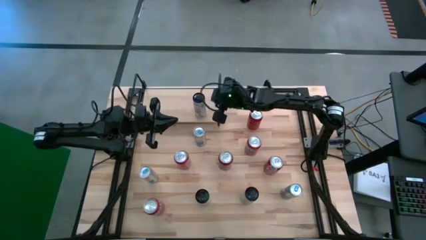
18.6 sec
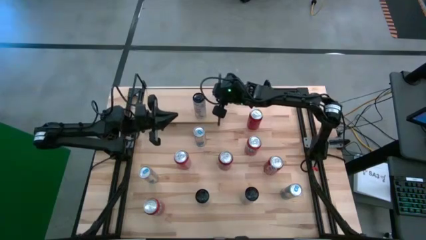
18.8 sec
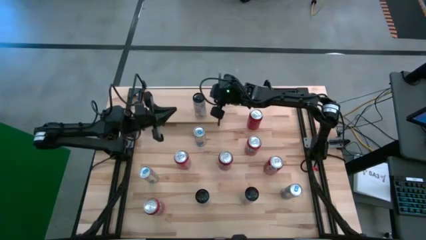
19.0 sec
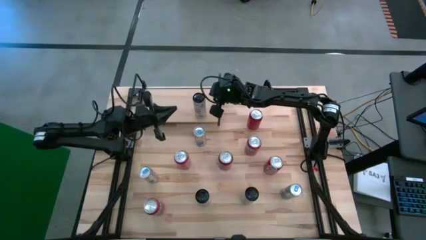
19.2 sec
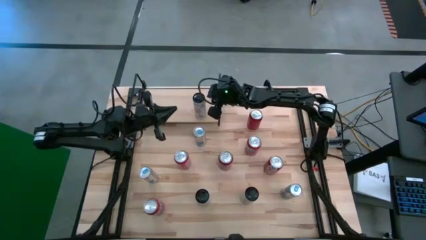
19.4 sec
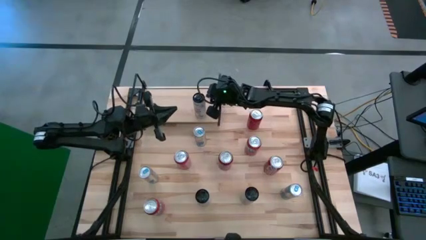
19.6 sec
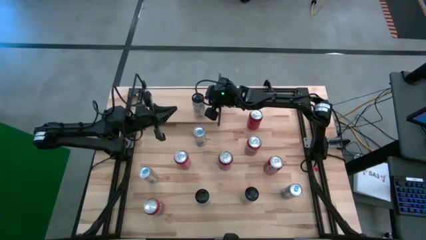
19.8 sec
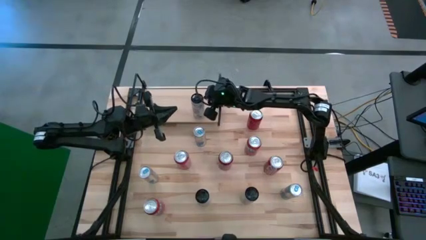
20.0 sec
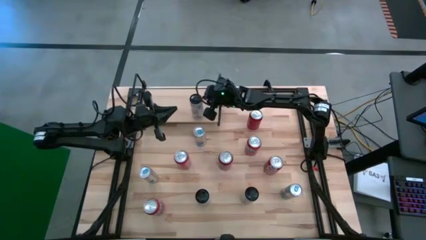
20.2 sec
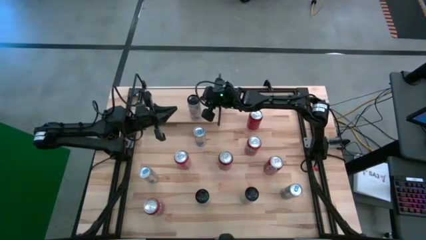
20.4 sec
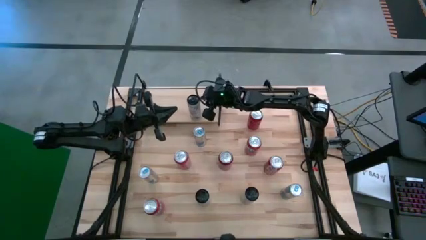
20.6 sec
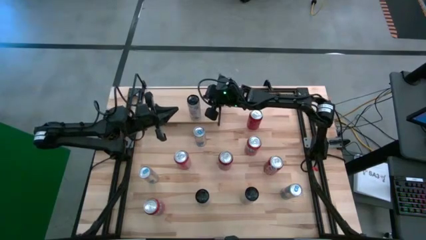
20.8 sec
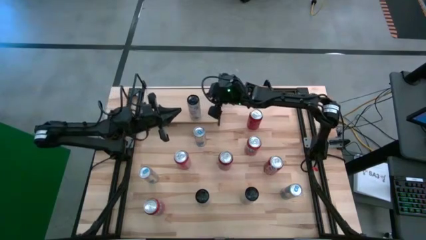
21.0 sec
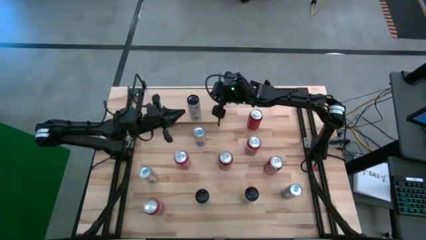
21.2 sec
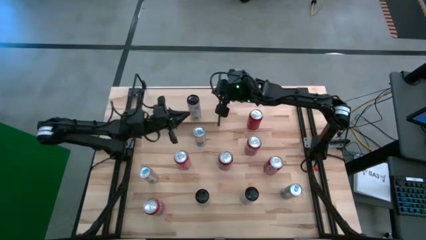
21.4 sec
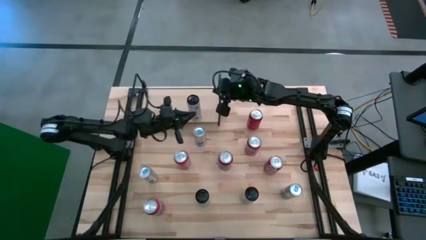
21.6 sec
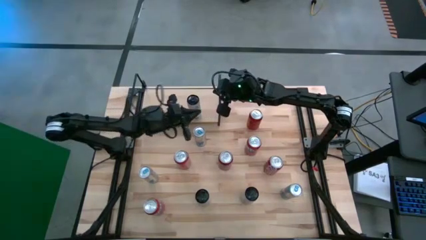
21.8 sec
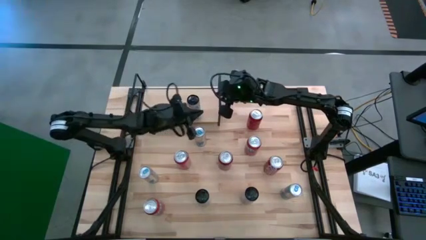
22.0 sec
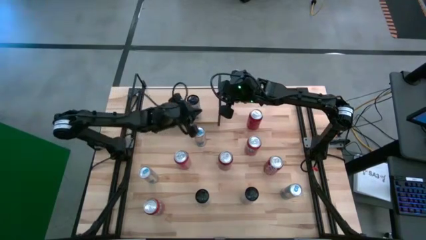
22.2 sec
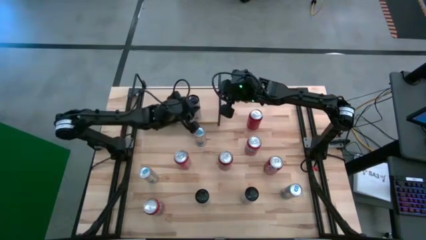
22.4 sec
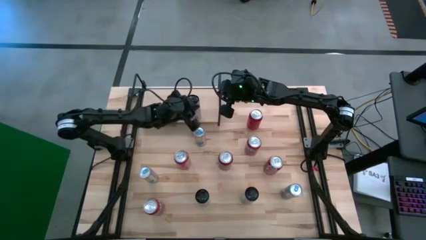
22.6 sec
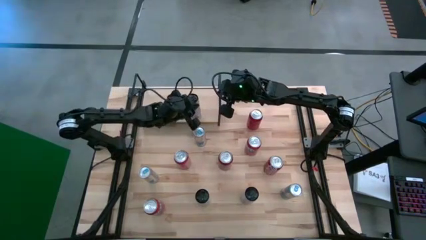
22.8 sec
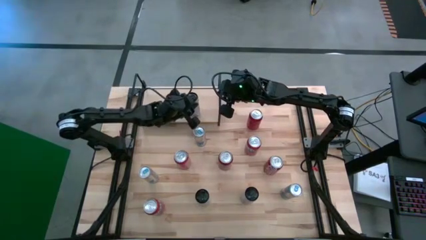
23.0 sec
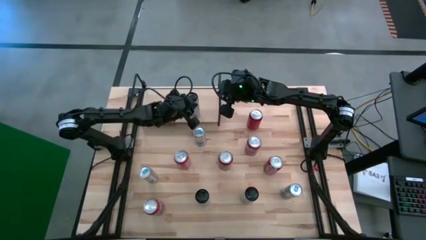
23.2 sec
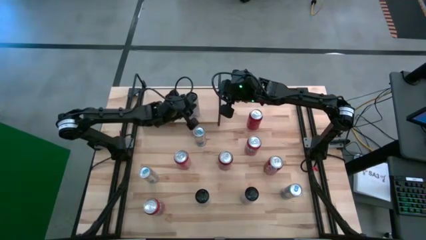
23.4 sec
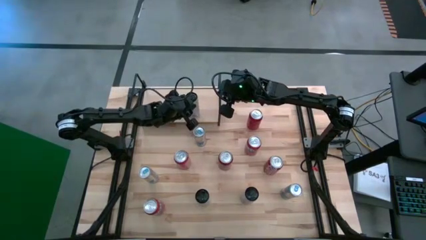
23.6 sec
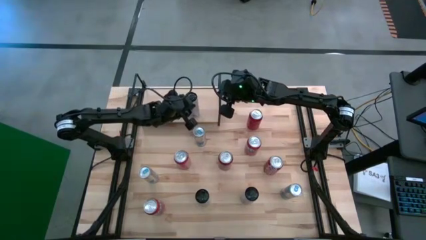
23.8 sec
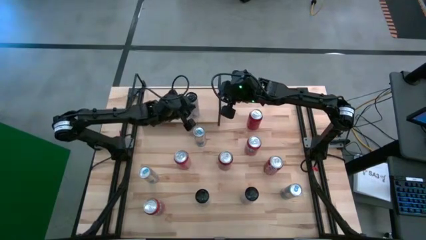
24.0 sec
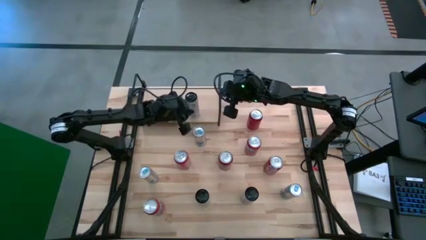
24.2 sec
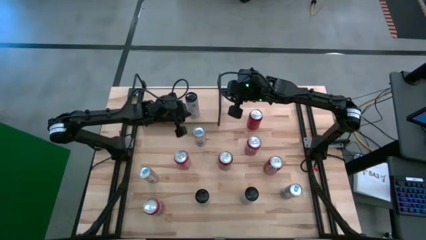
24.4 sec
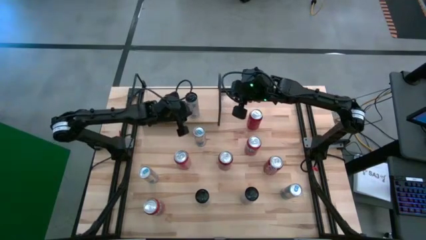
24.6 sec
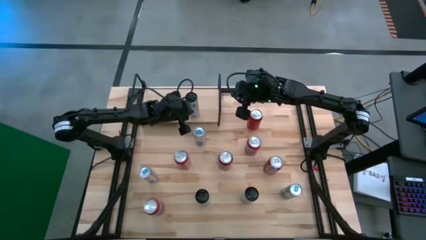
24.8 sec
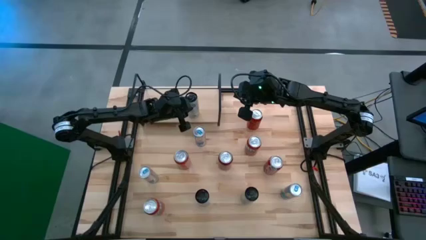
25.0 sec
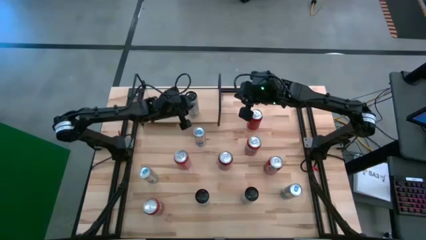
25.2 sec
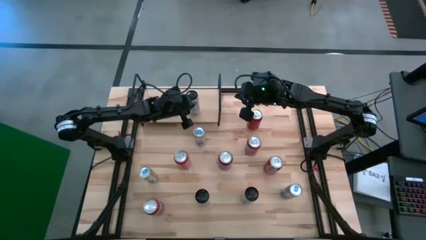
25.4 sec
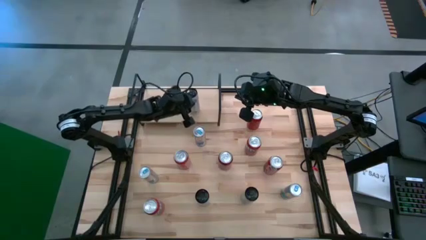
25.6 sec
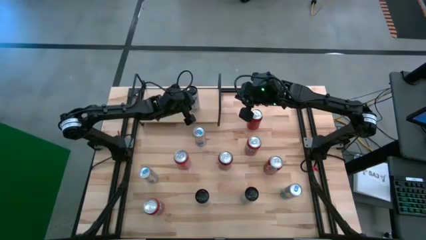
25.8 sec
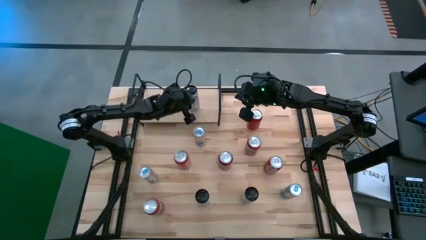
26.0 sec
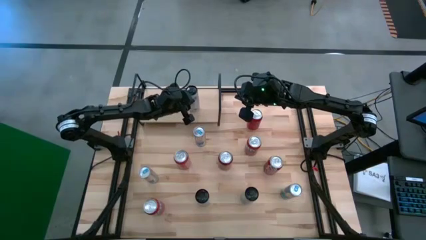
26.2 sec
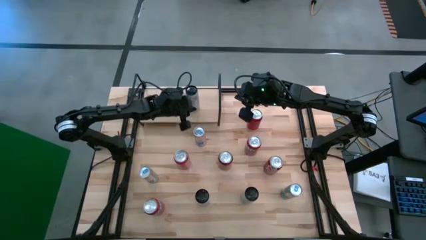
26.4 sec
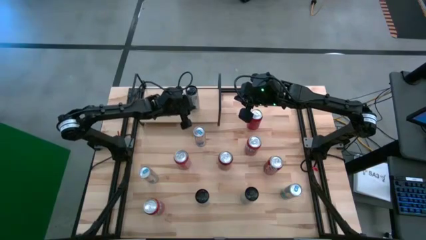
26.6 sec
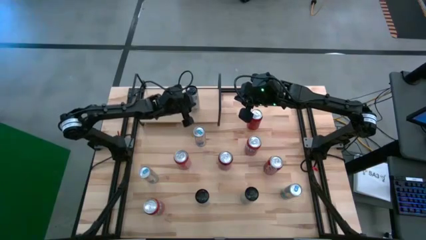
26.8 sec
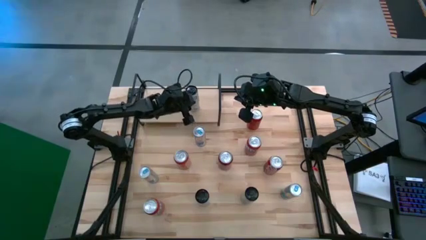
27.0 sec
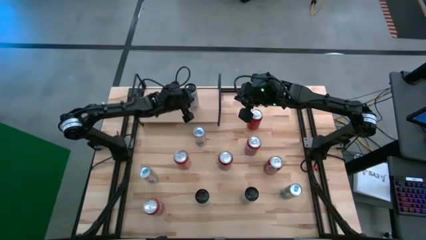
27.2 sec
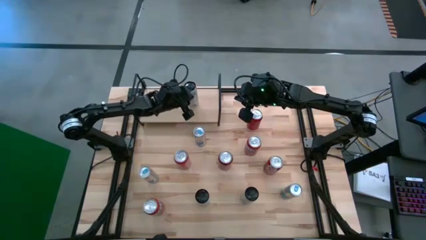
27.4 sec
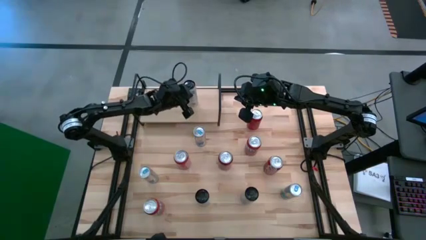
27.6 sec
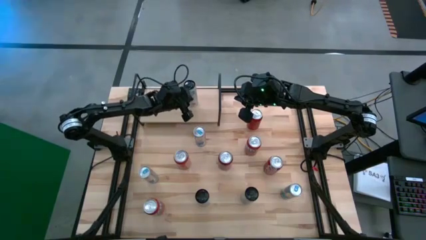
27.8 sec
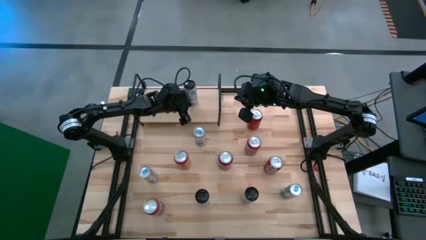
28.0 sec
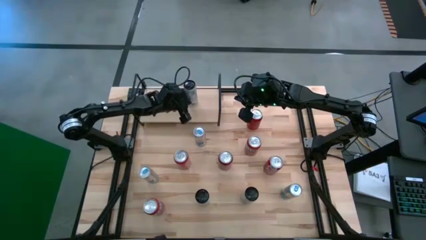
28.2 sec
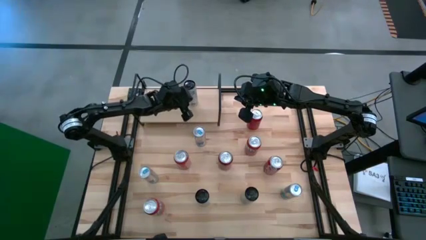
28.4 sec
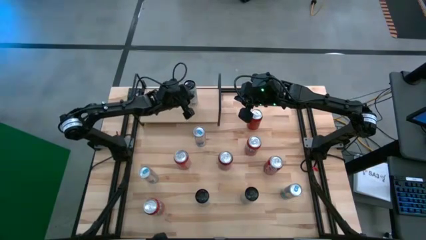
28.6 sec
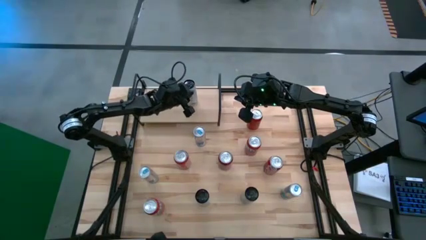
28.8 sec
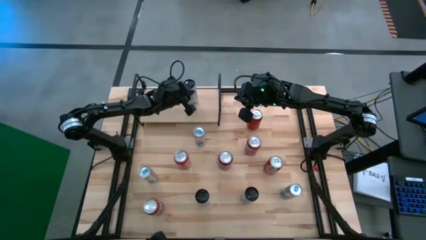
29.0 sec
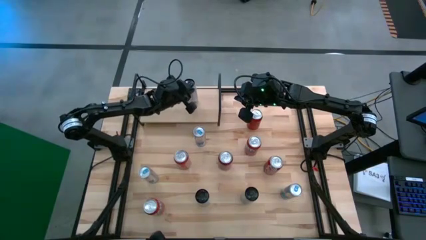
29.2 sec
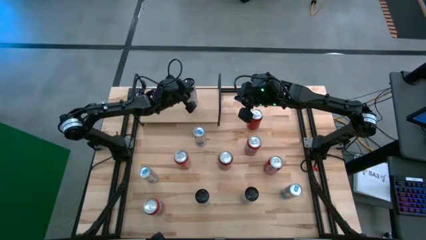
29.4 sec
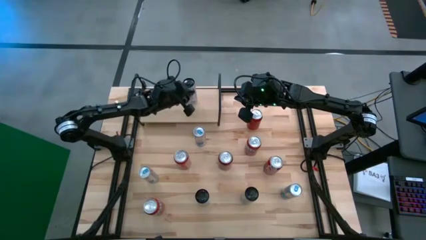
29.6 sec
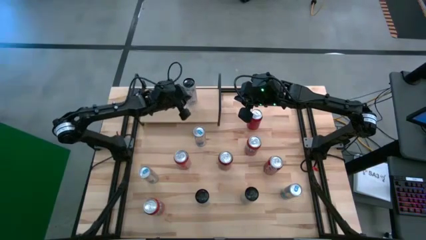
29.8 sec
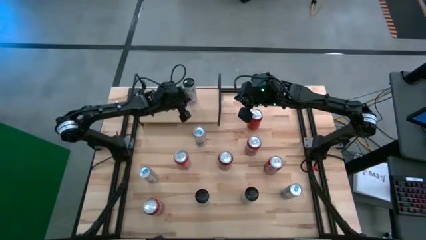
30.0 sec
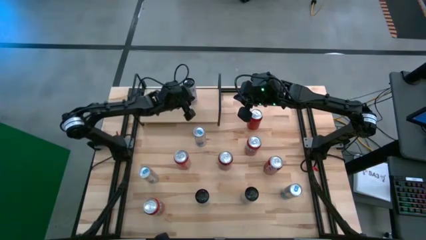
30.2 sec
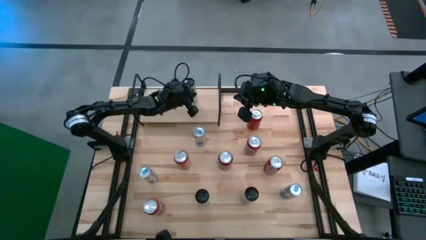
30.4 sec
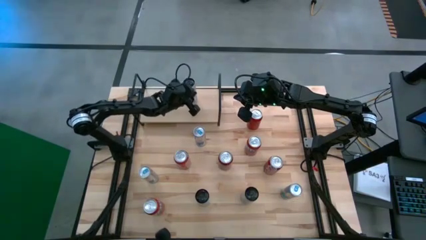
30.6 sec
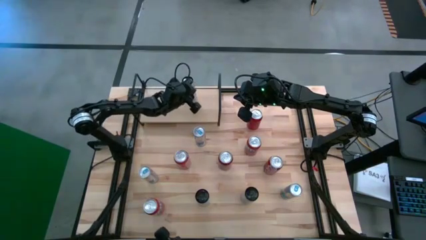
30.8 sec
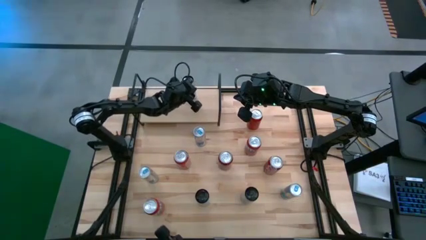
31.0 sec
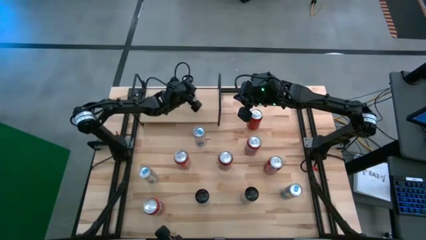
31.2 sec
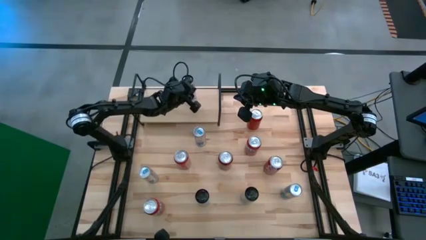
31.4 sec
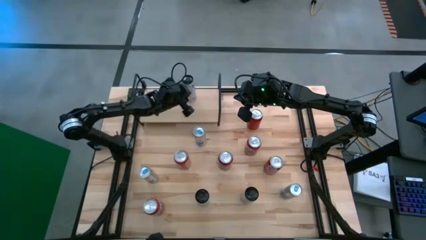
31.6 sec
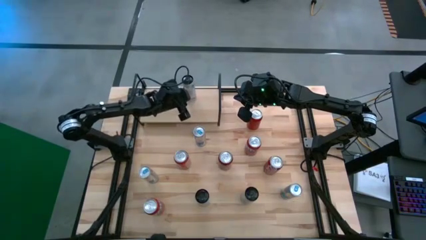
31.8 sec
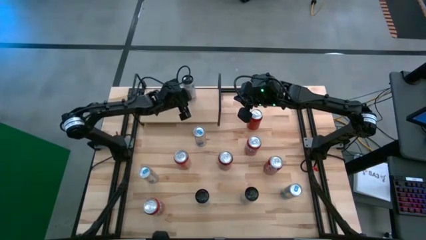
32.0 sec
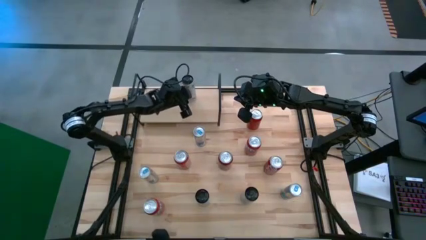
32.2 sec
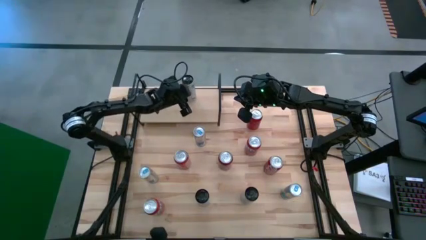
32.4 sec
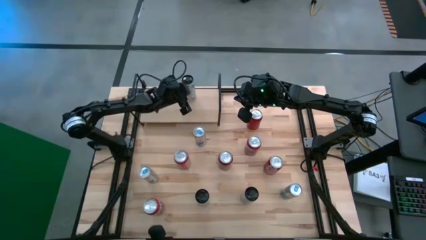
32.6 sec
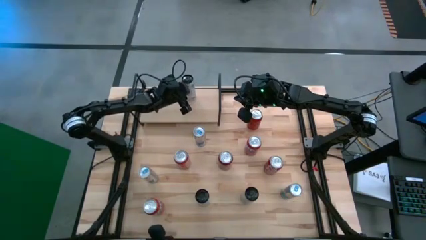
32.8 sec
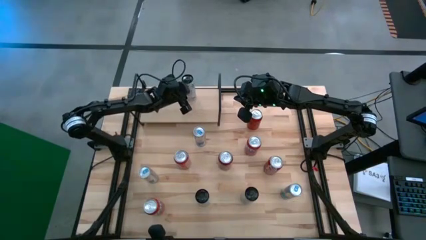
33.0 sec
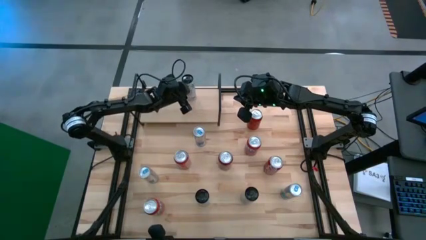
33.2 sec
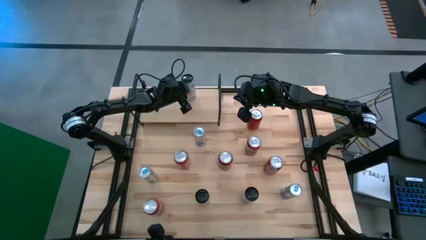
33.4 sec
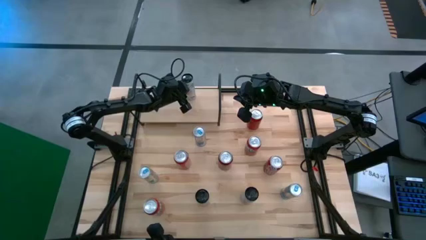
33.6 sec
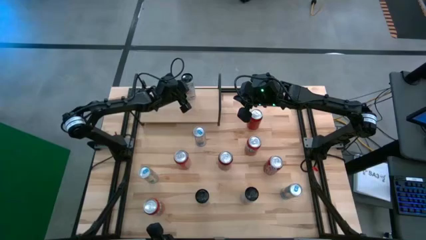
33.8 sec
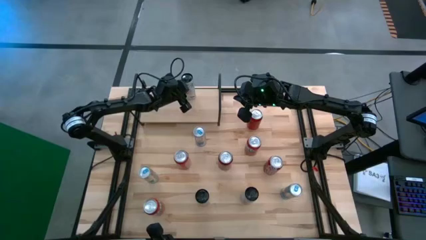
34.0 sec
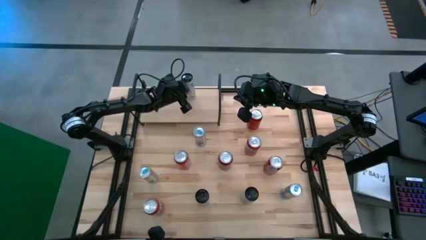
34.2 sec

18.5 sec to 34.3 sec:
Task: Place canned beverage on shelf
Put the top white pink soda can on the shelf
